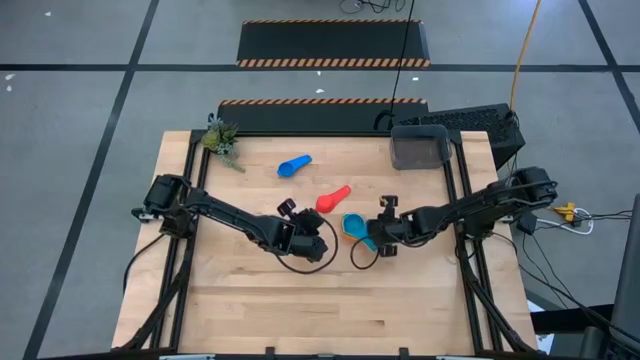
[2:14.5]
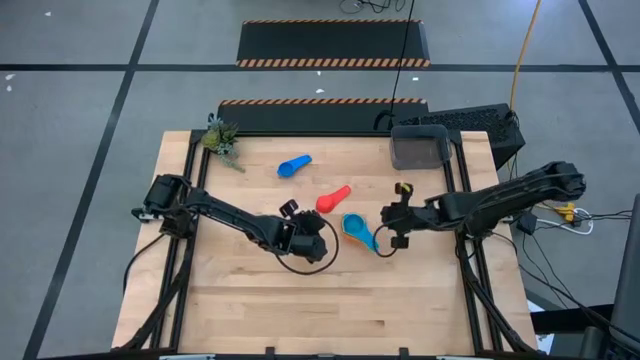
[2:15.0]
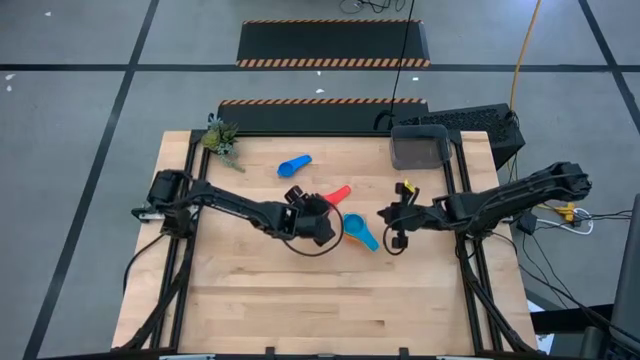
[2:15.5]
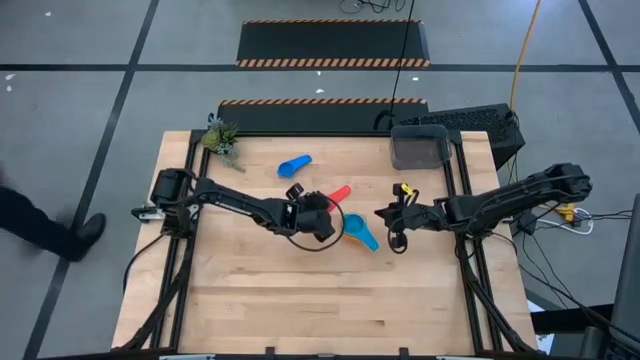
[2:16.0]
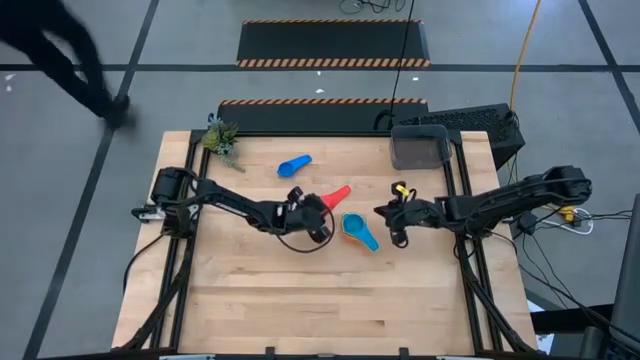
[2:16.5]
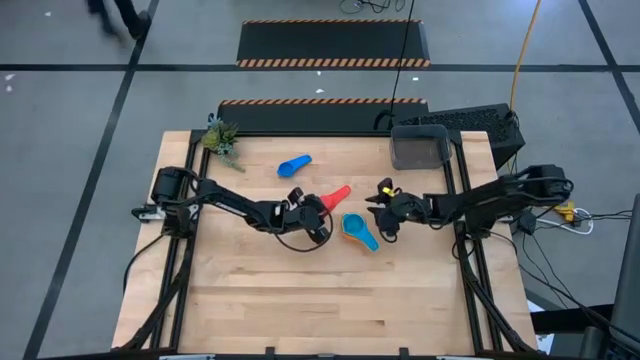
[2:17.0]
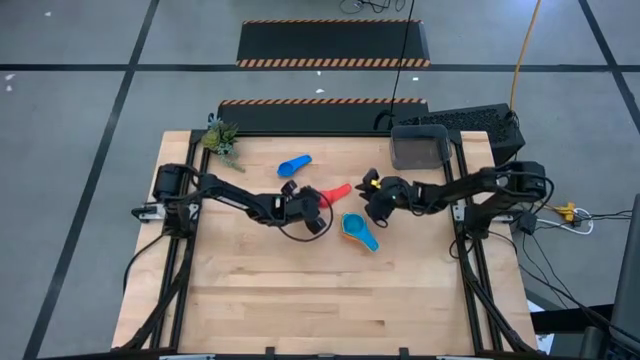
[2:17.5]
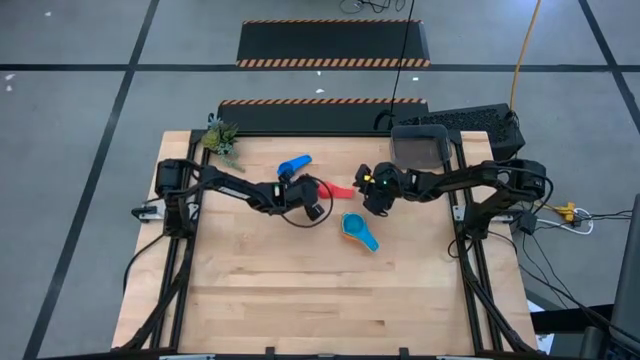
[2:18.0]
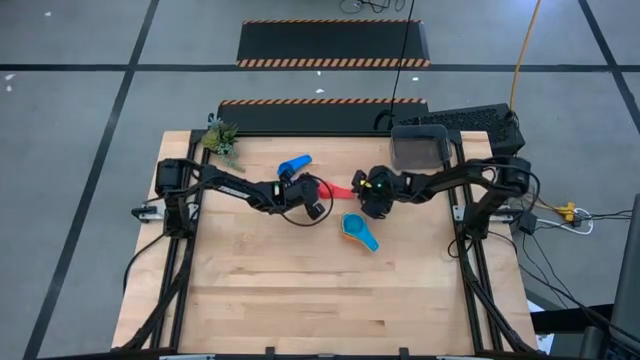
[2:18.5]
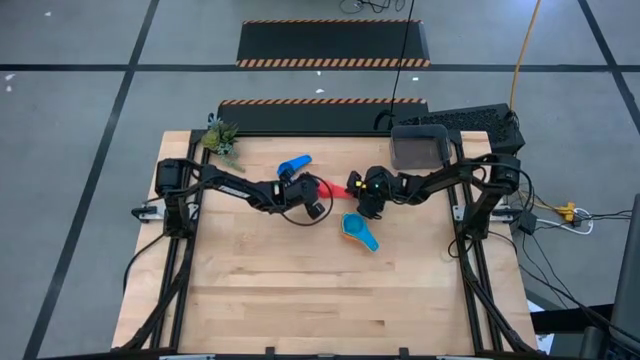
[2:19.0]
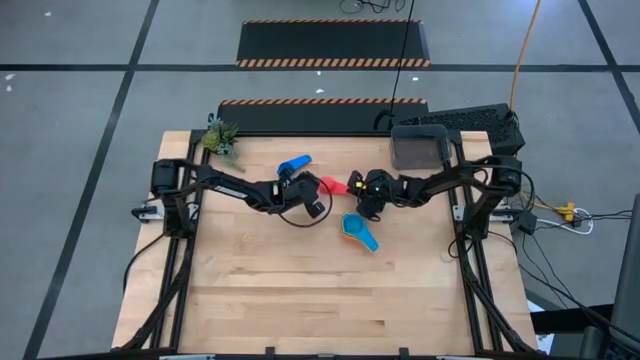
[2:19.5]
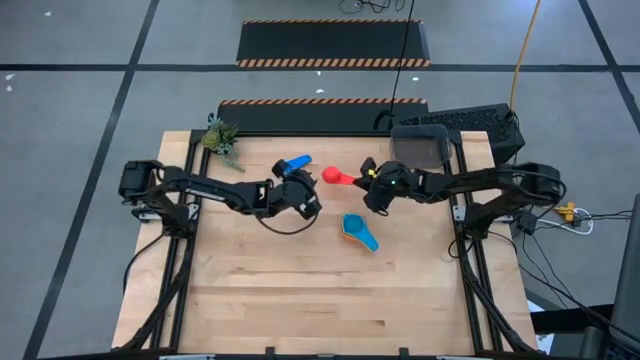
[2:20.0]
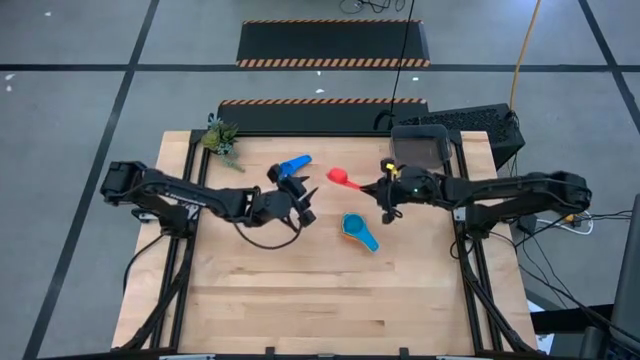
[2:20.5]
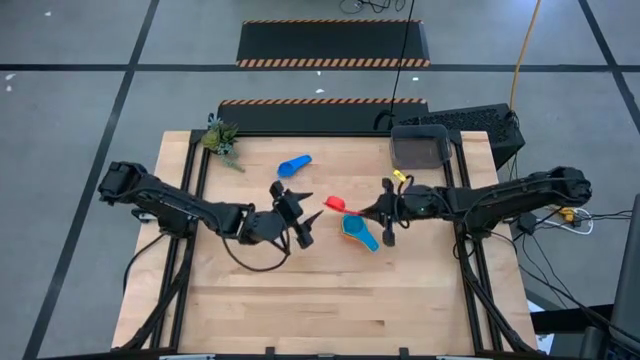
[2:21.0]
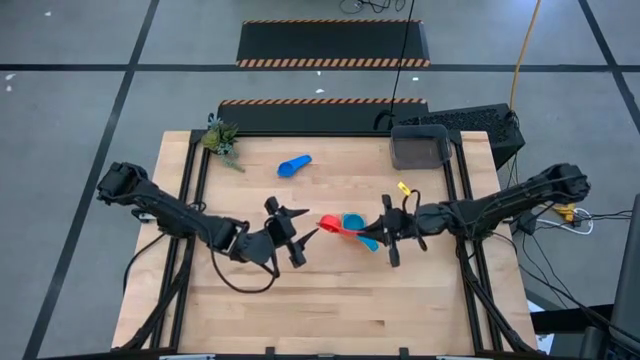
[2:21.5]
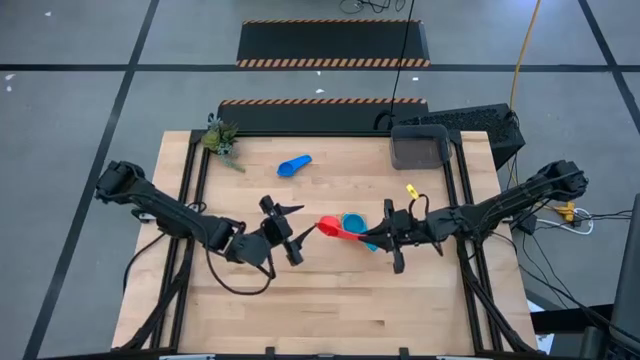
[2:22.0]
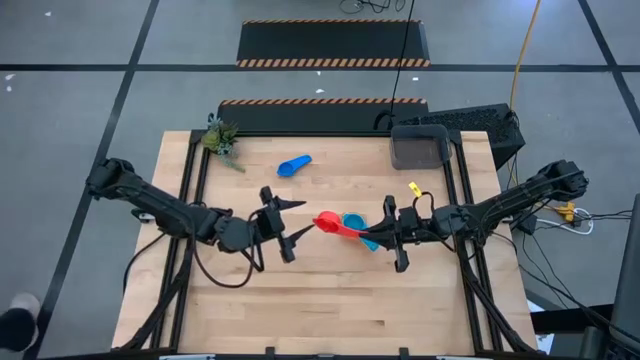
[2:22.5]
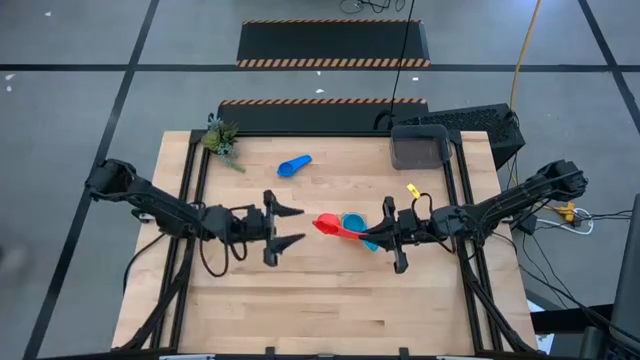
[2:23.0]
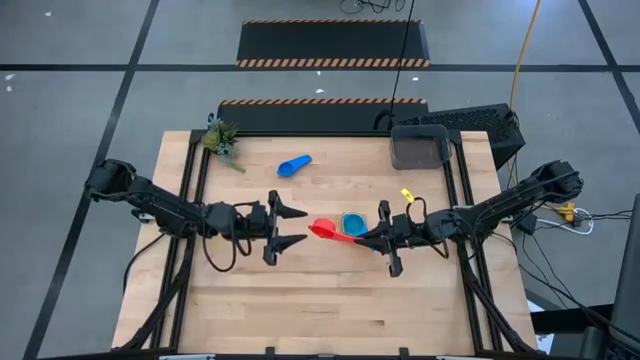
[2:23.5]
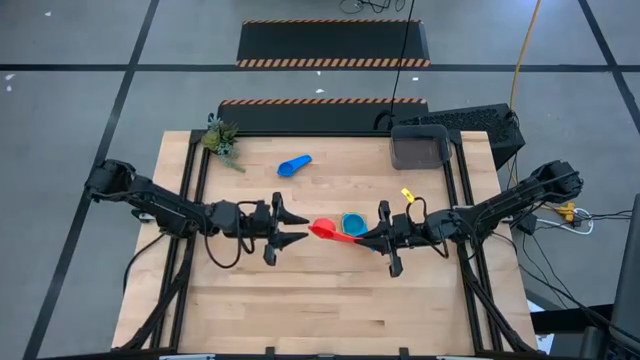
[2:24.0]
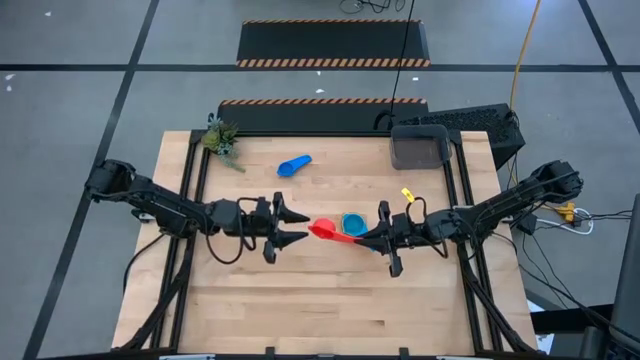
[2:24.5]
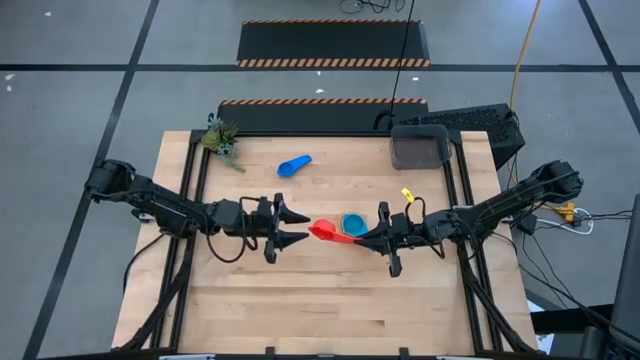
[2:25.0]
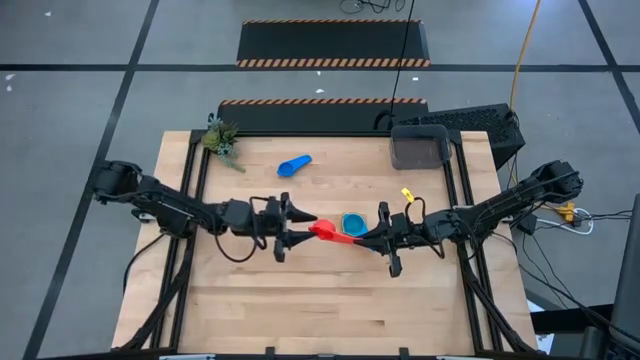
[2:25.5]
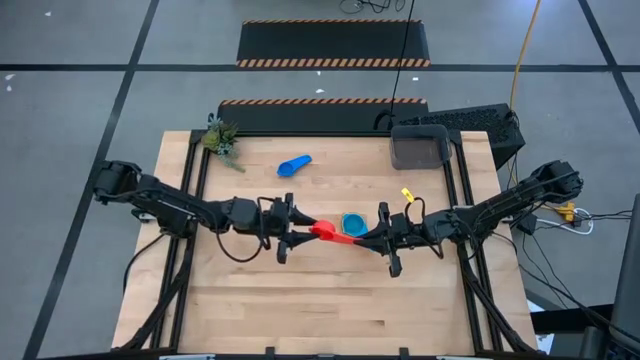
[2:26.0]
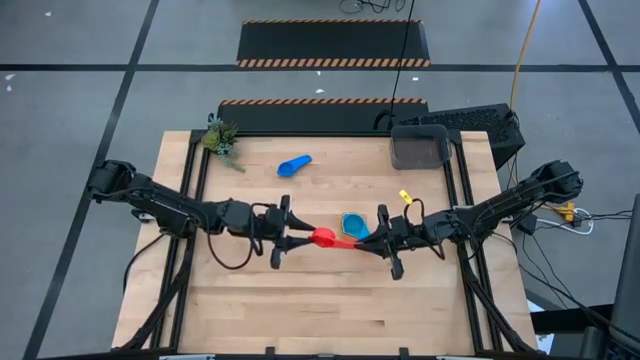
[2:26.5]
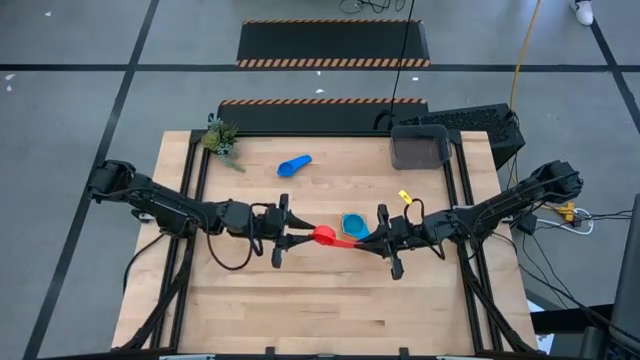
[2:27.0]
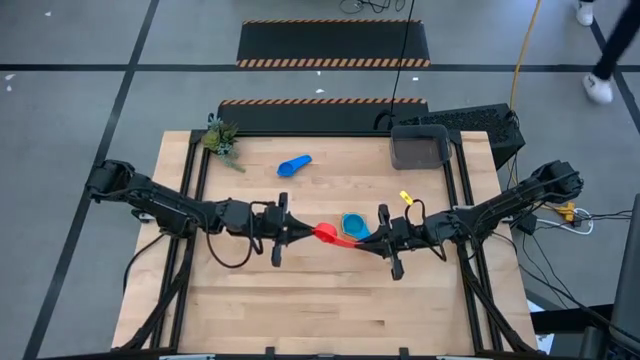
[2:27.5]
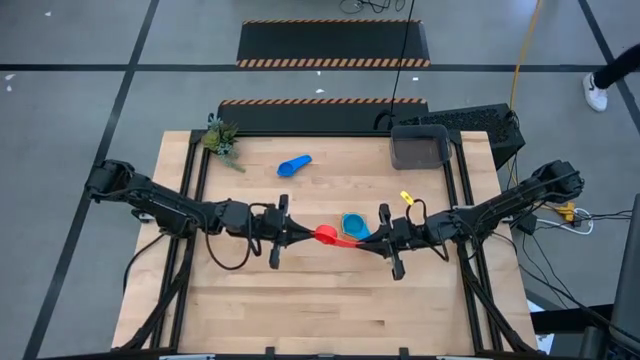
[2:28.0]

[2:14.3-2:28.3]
Task: Nest measuring cups in basket
Stack the light red measuring cup on top of the light blue measuring cup

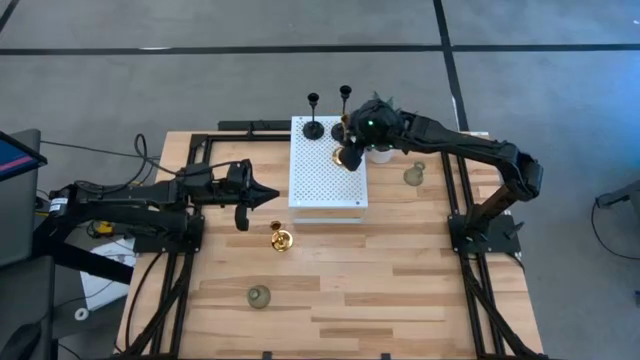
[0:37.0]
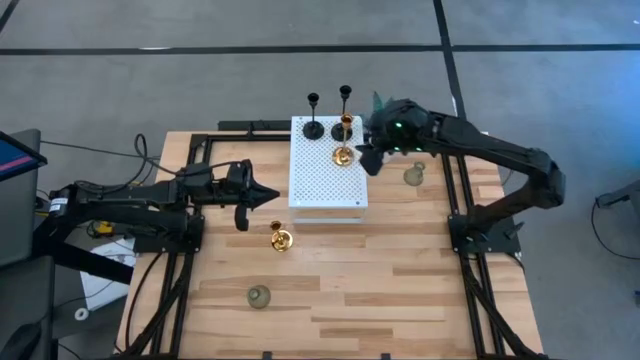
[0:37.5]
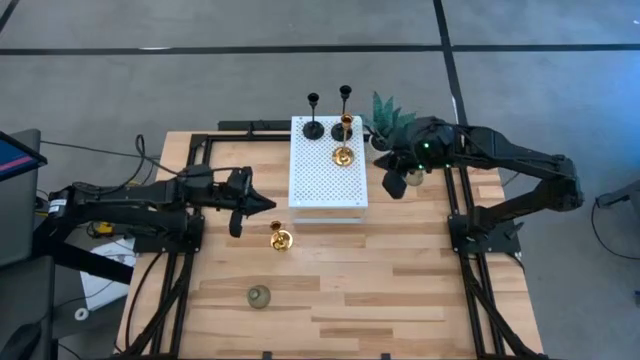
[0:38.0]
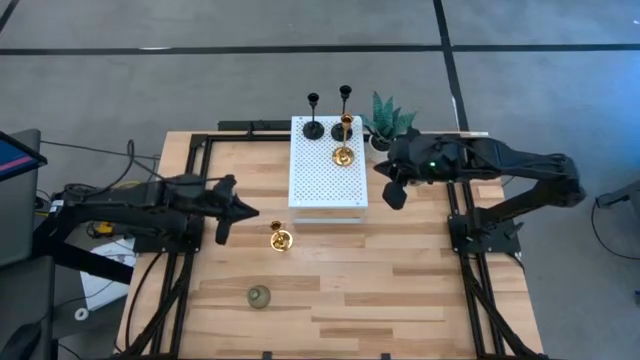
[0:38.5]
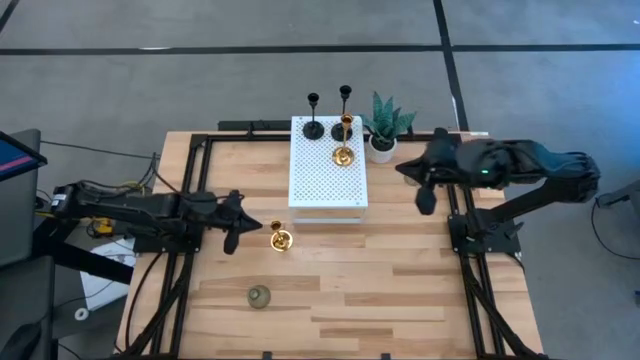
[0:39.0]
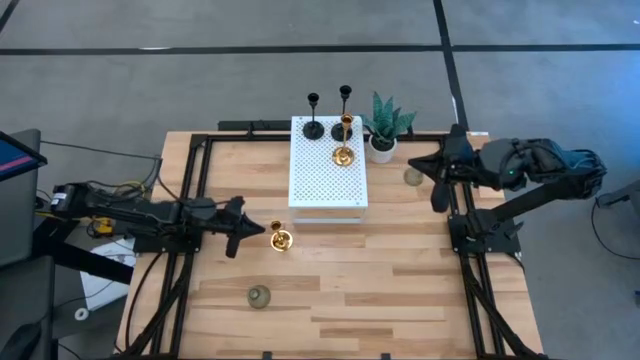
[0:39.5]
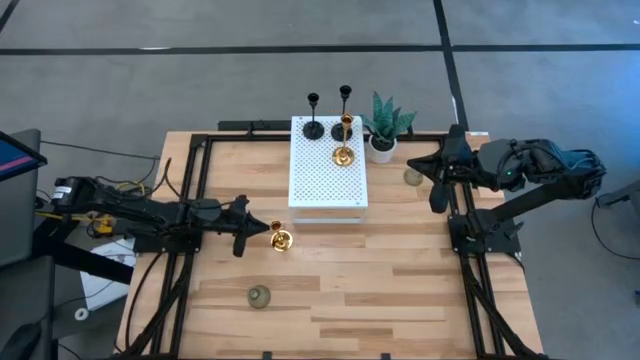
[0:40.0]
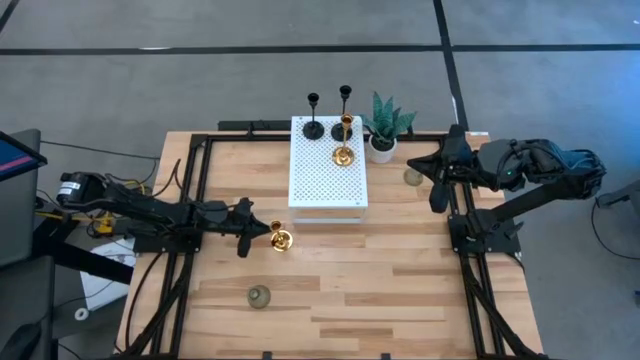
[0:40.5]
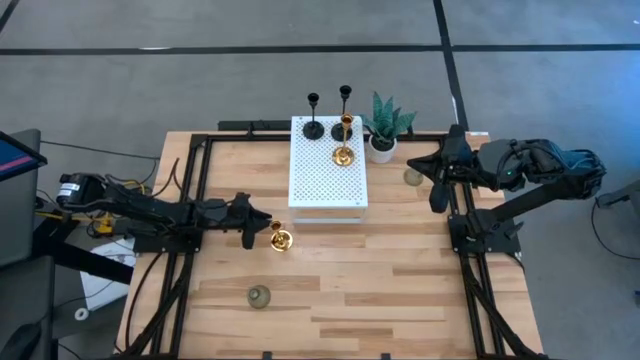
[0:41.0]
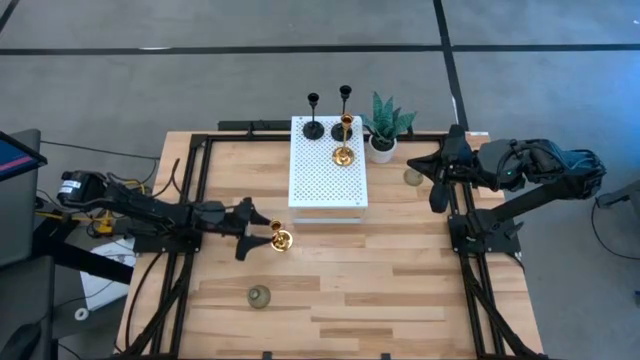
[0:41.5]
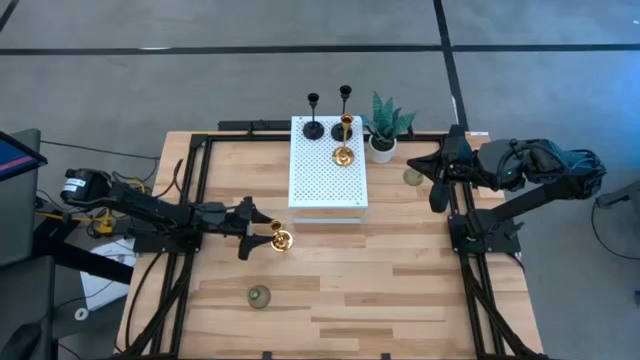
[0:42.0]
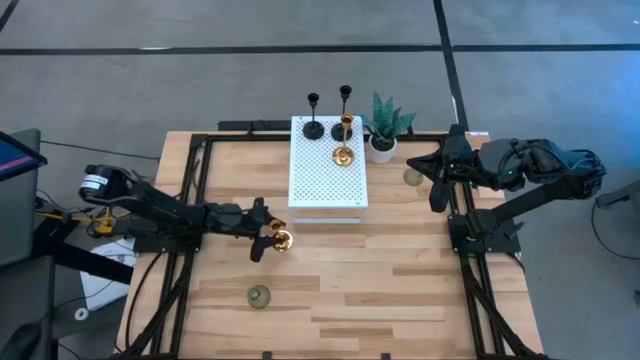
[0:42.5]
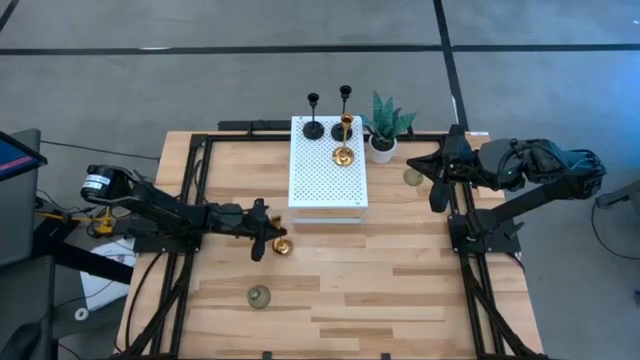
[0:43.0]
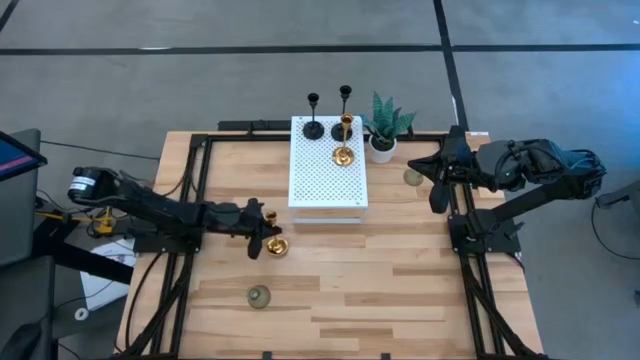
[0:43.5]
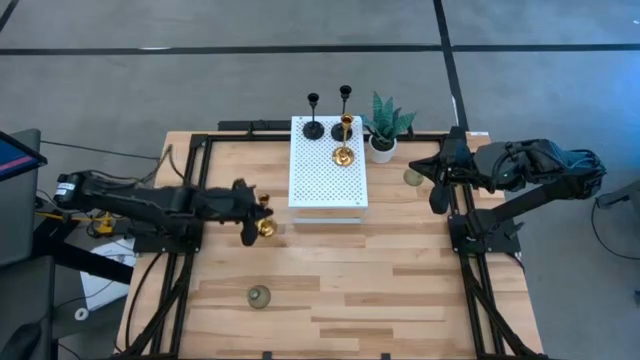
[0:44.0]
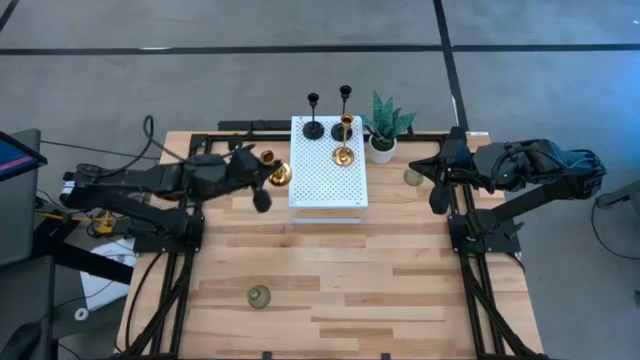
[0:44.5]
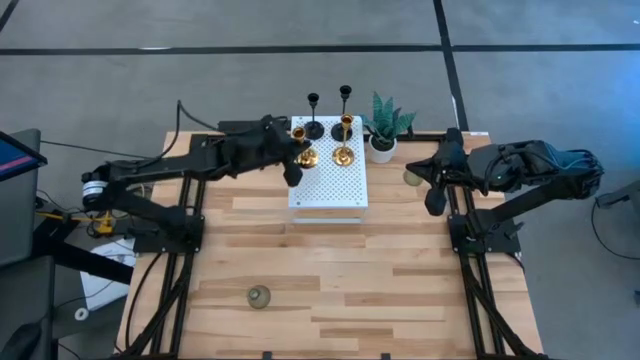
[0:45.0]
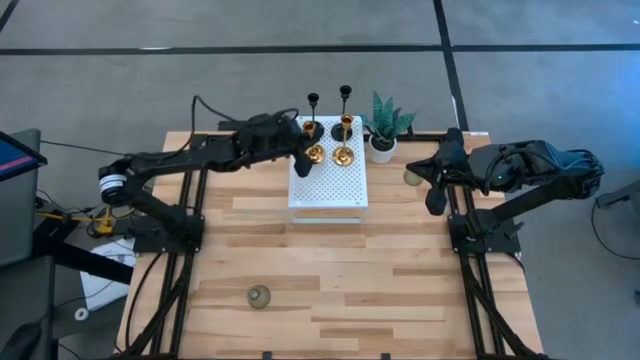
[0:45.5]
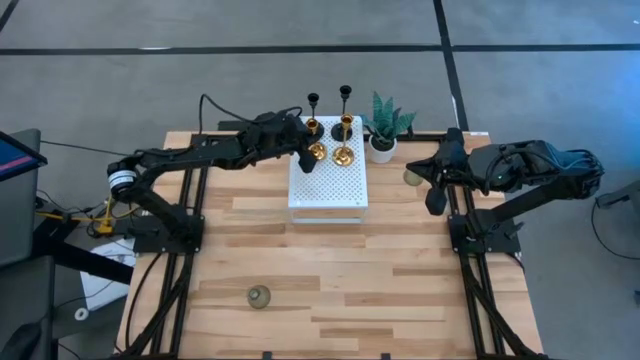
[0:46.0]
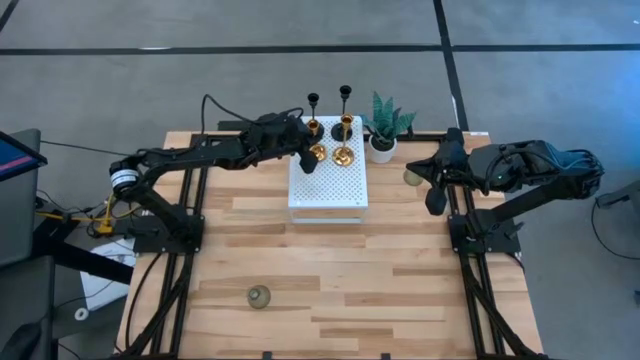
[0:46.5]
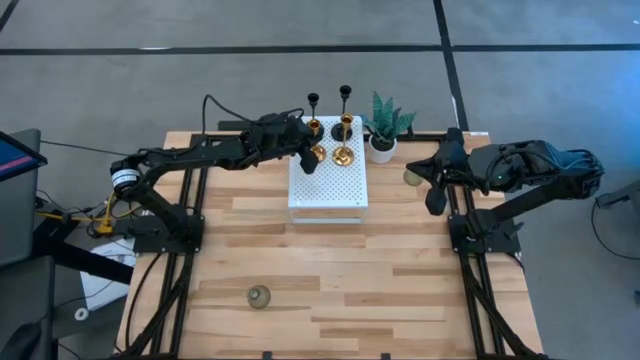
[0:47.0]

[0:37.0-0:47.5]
Task: Pick & Place candle stick holders
Align the golden candle holder with the other golden candle holder on the shelf
